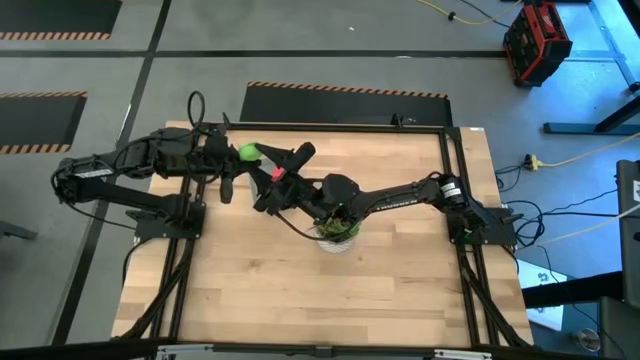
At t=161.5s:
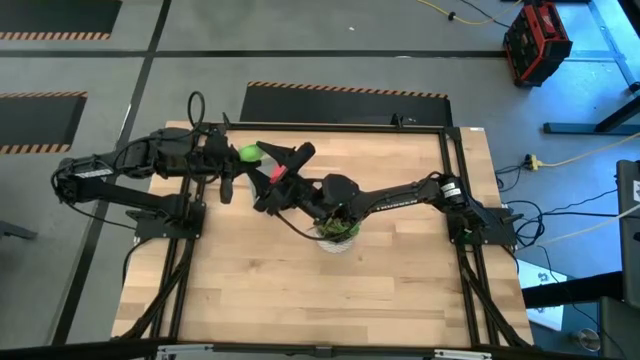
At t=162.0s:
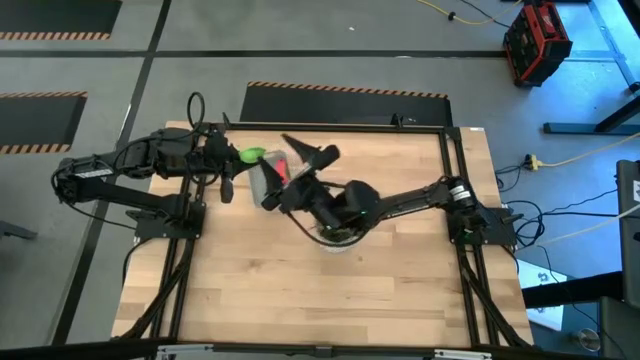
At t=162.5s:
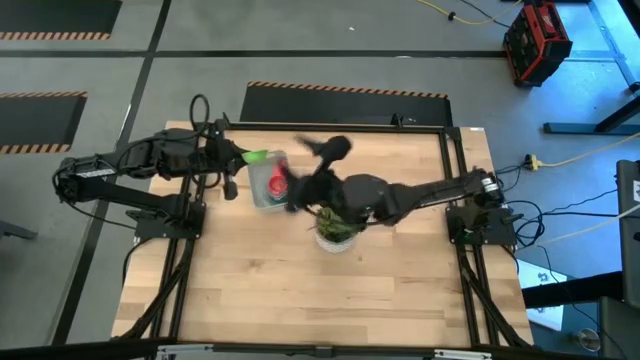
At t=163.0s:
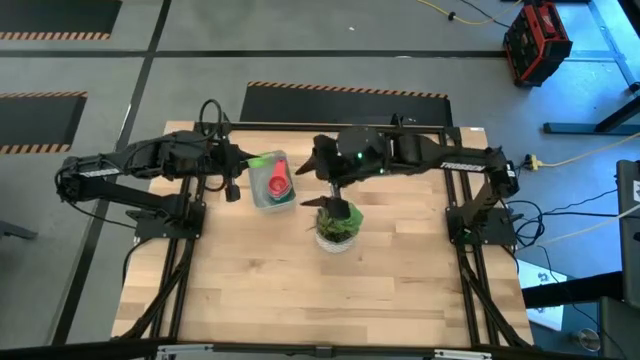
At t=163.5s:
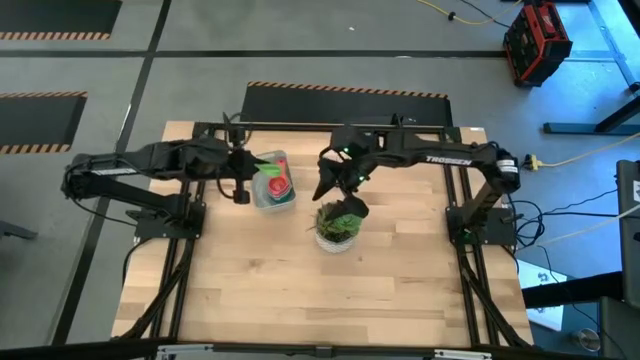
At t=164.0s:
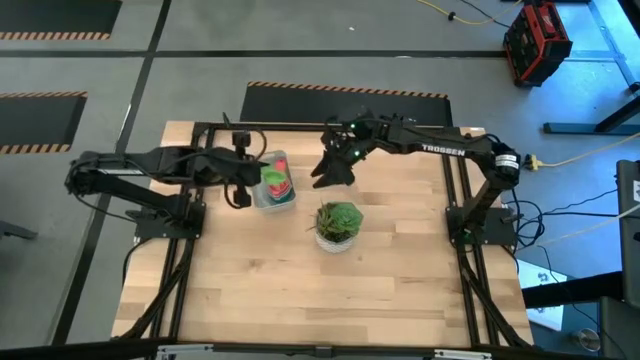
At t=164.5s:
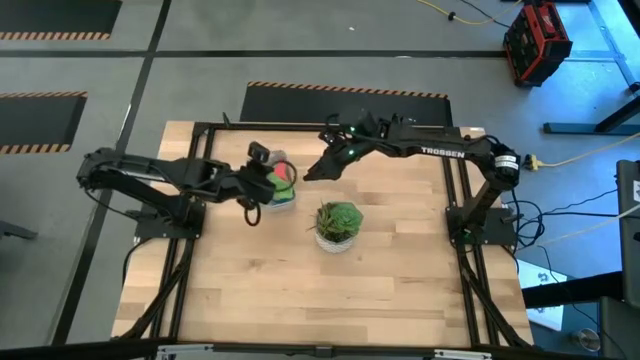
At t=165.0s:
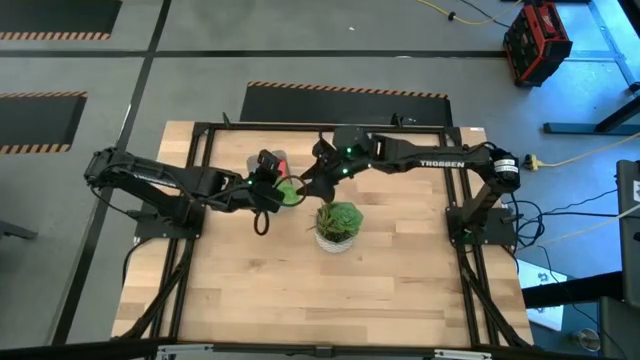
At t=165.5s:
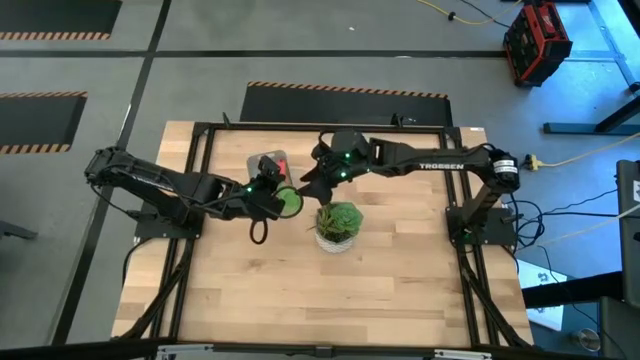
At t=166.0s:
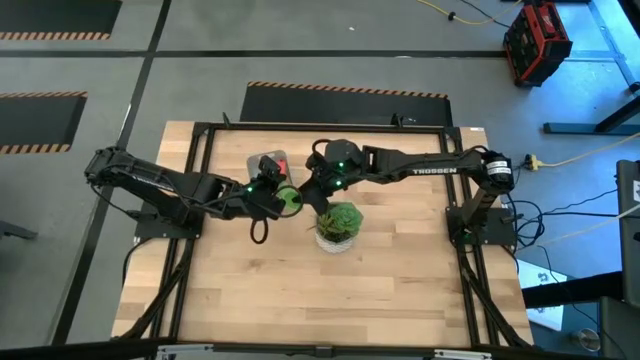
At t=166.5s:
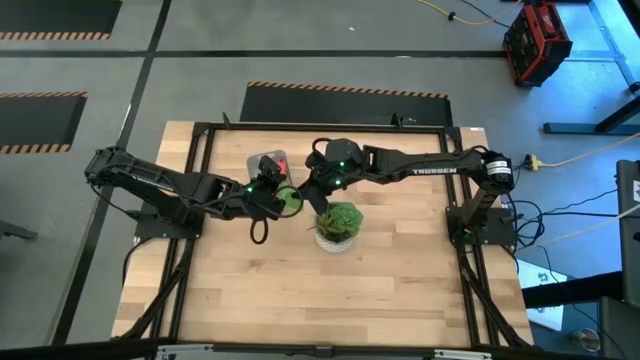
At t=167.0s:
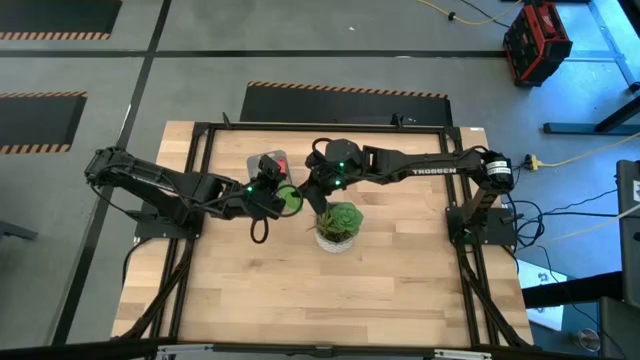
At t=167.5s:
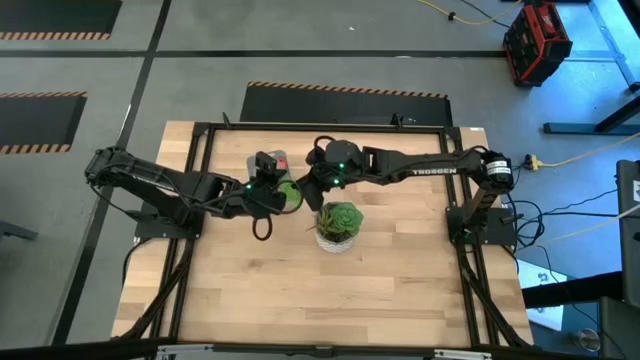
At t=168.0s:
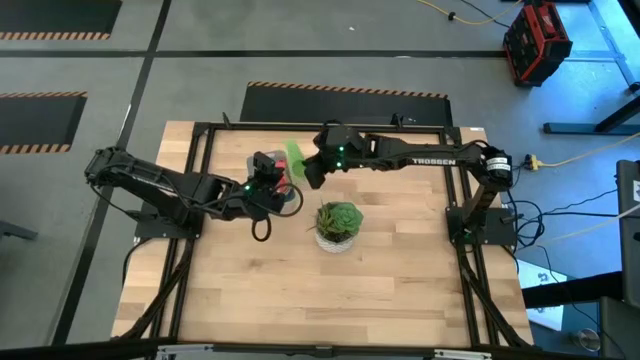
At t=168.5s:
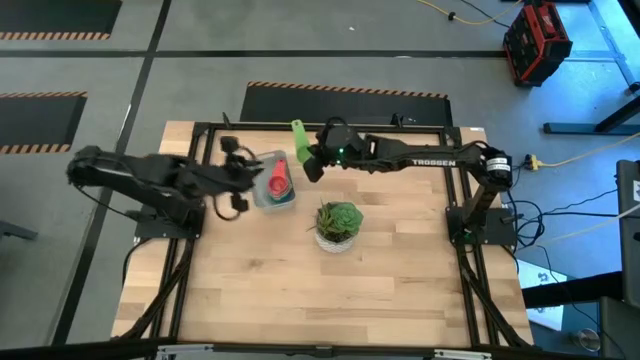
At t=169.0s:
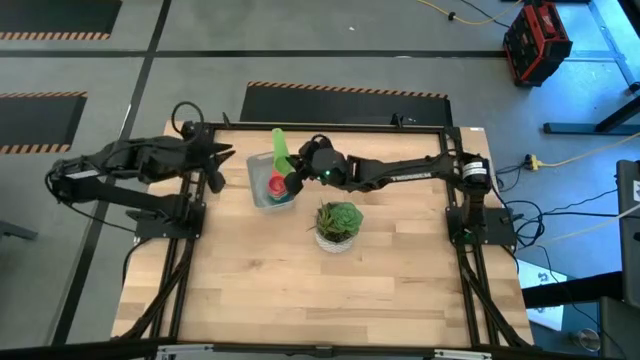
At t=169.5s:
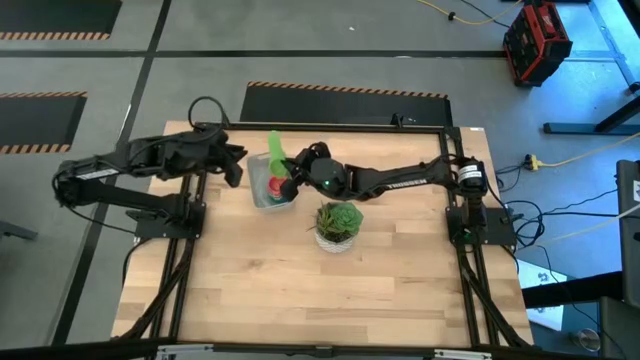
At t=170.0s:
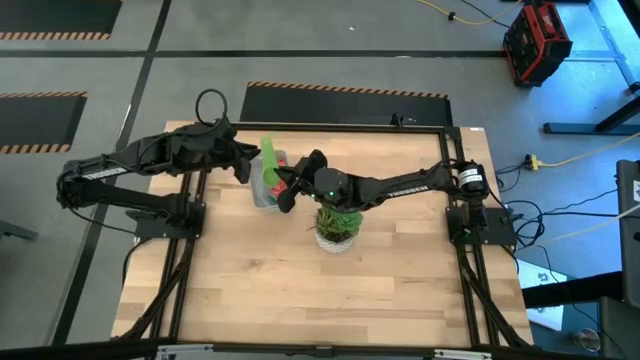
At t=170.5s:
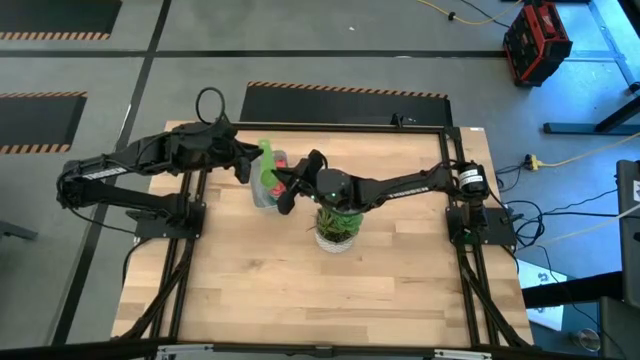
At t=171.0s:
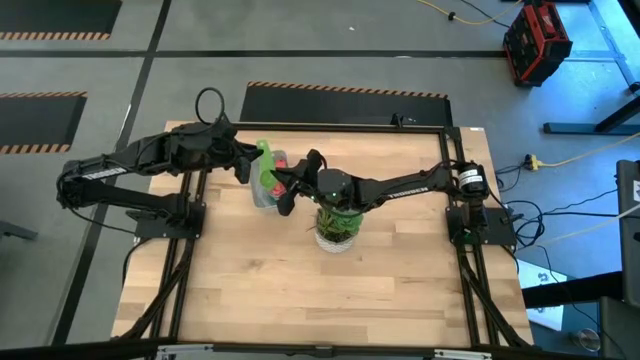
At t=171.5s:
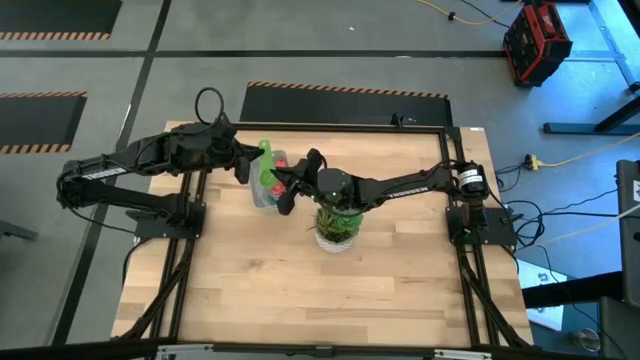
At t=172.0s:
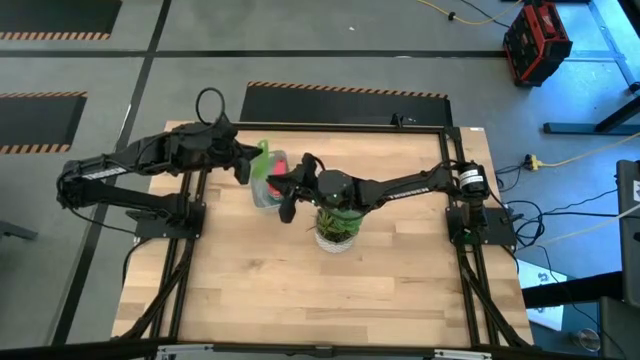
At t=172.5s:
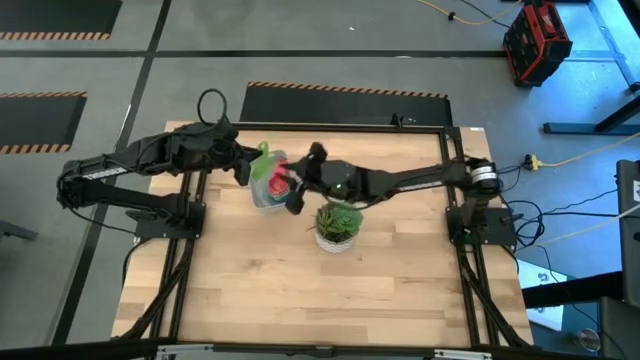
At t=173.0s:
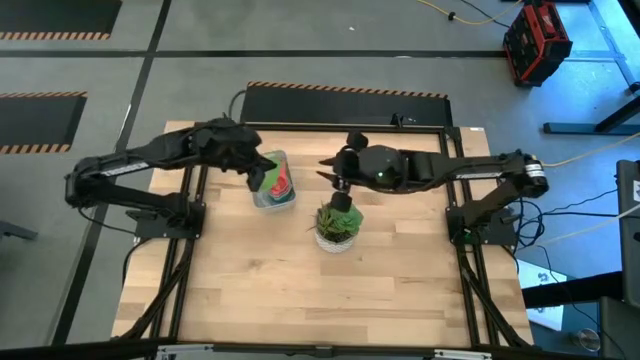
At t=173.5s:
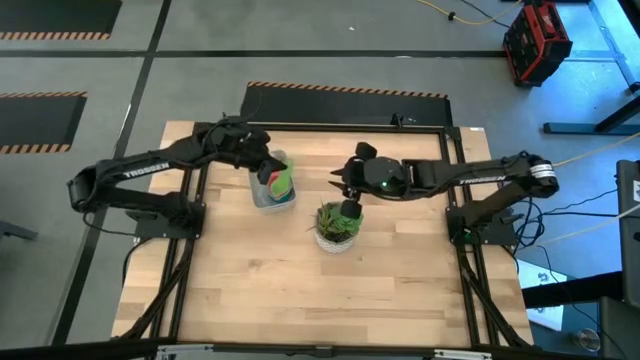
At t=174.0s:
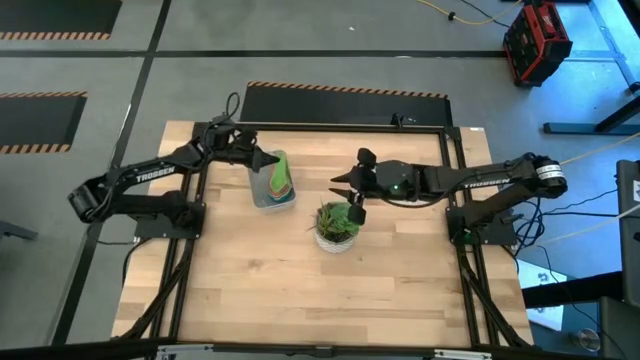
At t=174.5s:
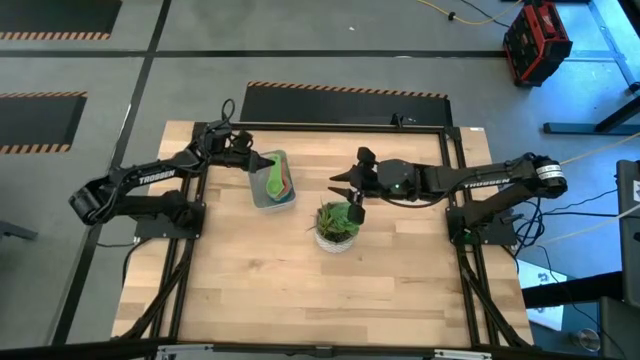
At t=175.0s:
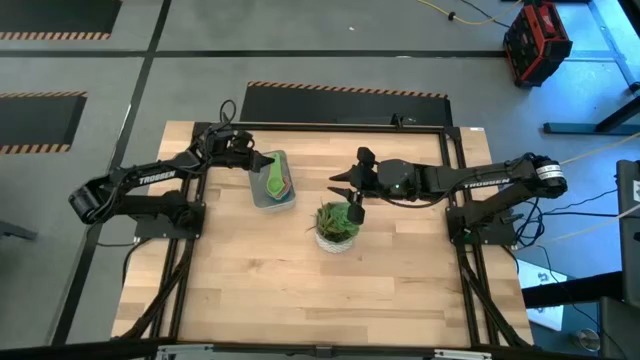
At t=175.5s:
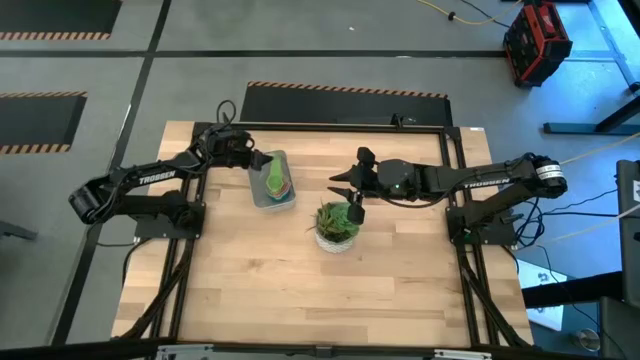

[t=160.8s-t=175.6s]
Task: Nest measuring cups in basket
Stack the green measuring cup on top of the red measuring cup in the gray bin

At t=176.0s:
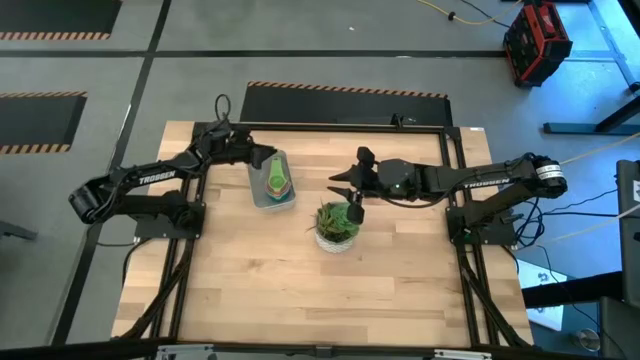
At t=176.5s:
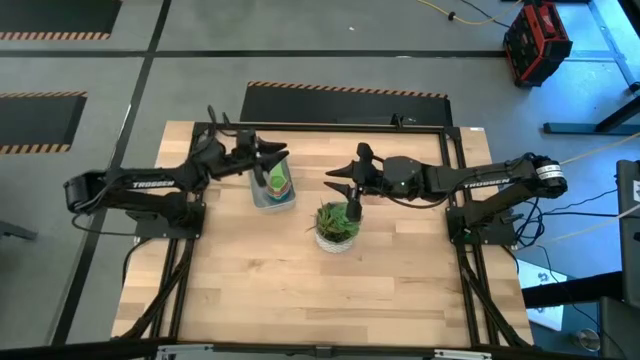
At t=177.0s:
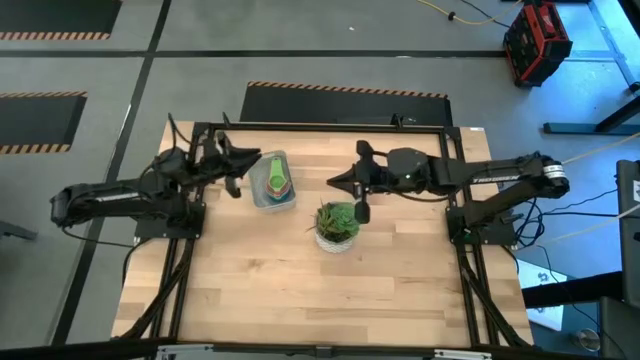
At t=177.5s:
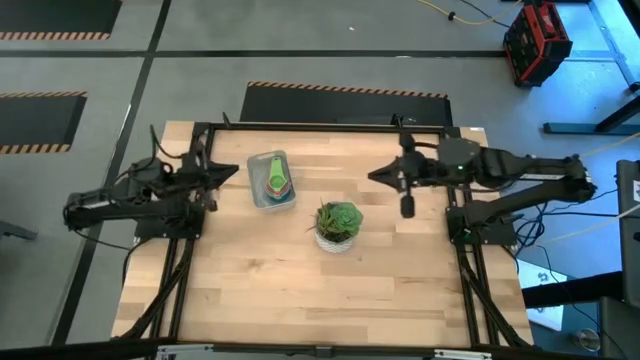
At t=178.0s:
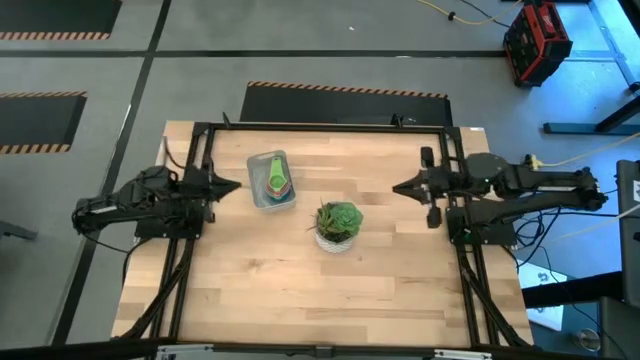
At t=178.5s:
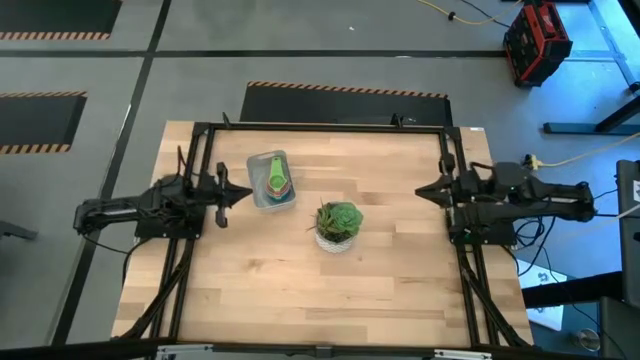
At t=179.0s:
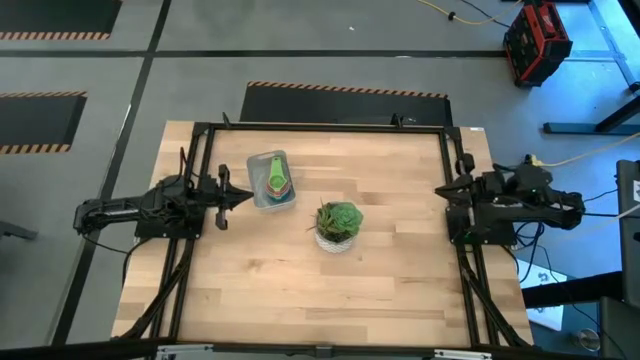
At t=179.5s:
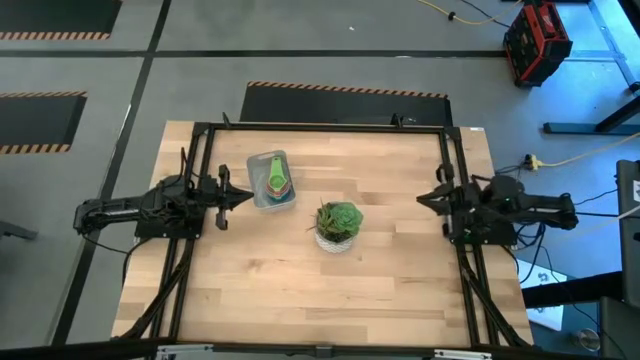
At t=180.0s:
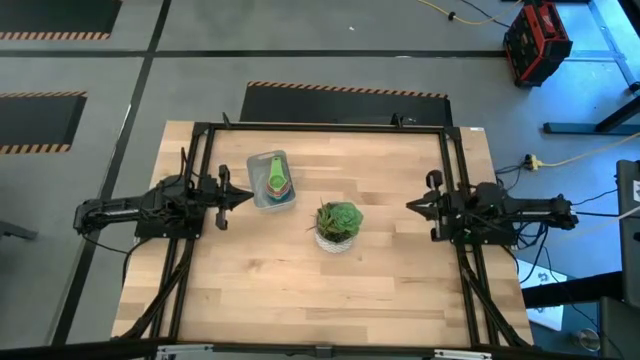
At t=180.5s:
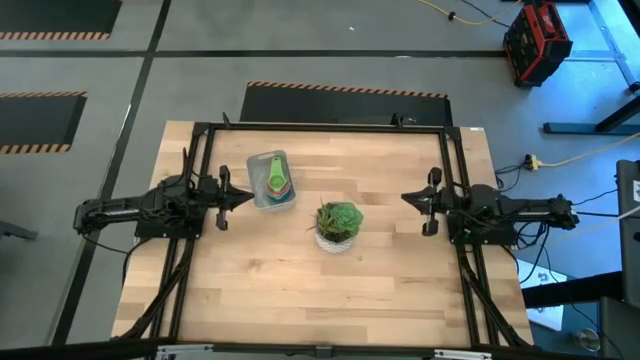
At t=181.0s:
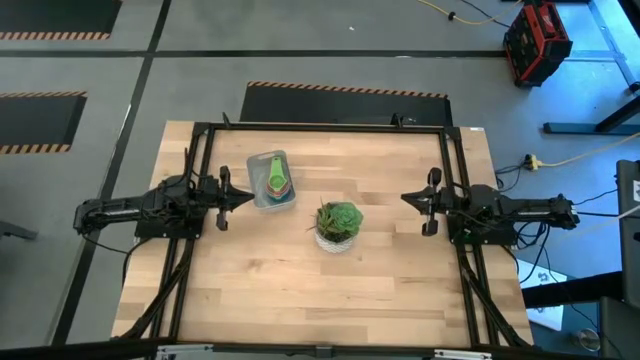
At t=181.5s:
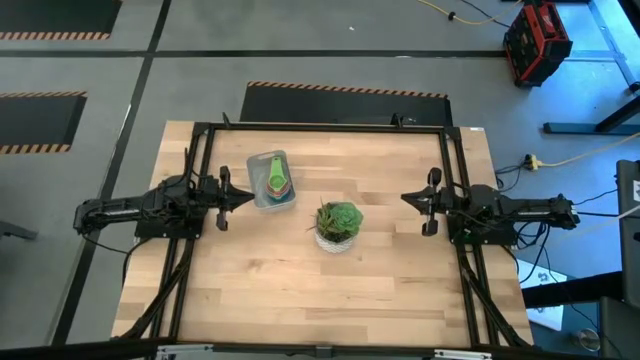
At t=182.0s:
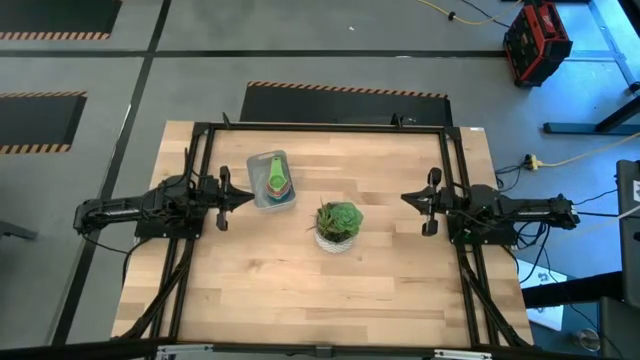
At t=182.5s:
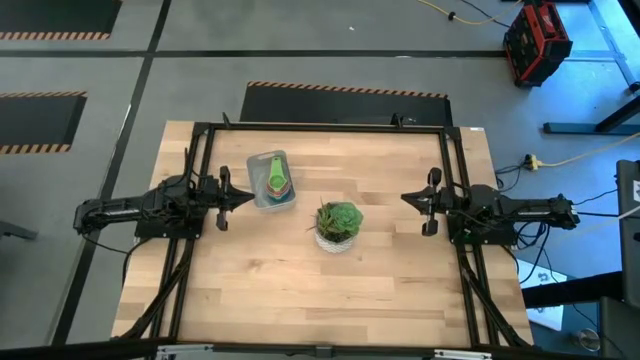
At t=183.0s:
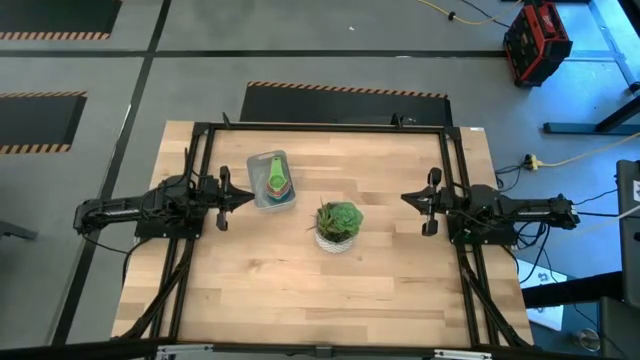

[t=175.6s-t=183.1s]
Return to Home Position
